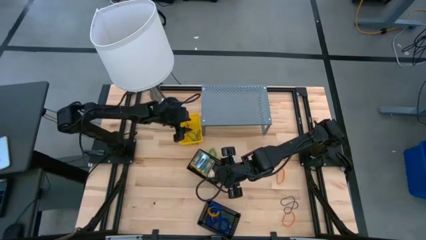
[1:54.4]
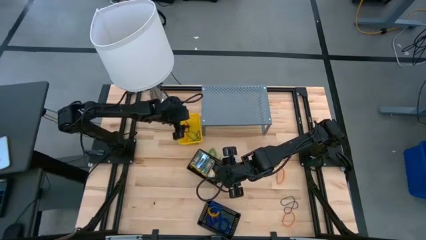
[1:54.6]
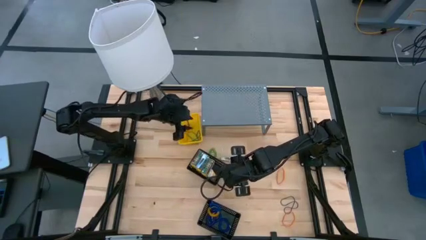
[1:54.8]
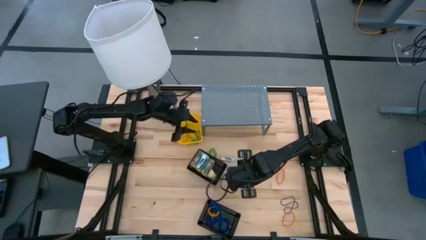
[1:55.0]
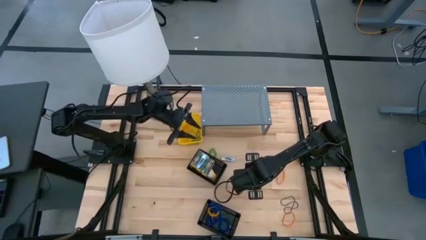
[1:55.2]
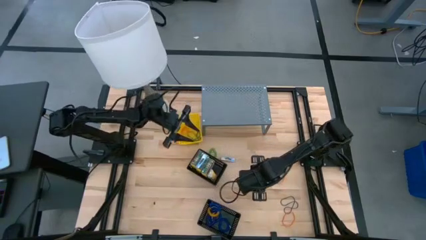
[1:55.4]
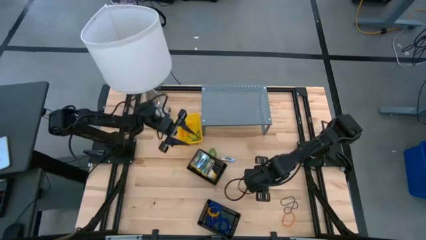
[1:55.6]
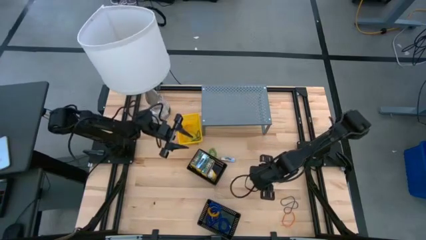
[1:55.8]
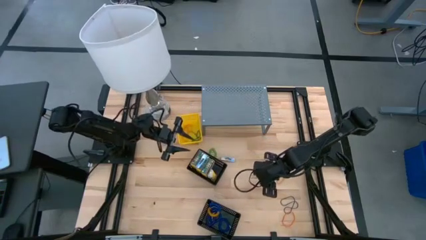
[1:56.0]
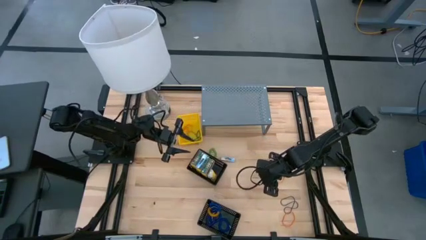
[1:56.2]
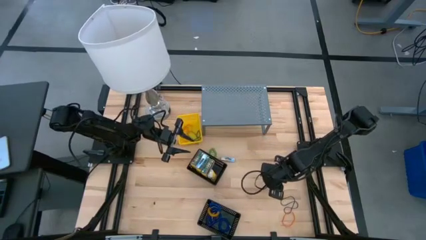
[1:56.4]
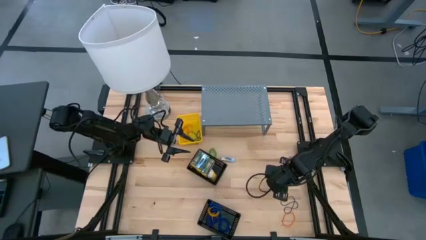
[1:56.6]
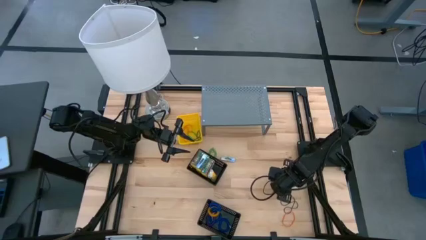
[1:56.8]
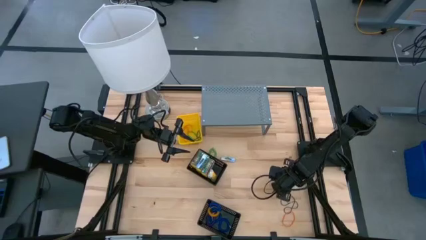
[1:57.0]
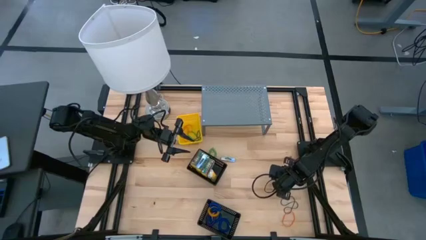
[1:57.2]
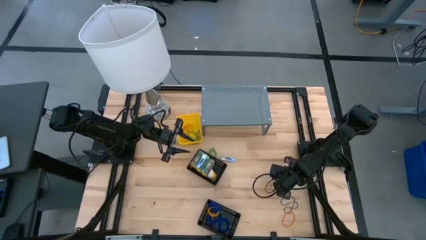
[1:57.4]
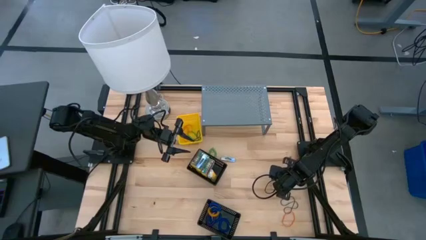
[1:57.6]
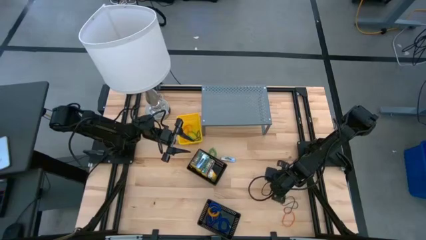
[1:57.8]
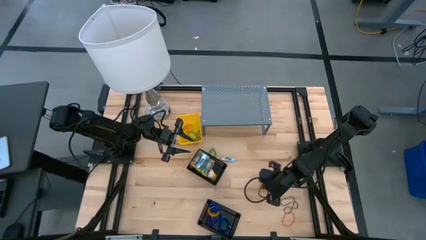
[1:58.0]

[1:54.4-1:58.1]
Task: Pick & Place Office Desk Supplies
Put the top orange rubber band into the yellow bin

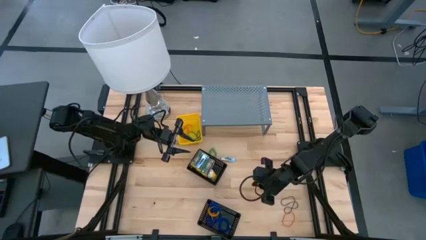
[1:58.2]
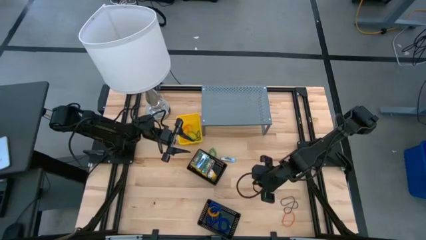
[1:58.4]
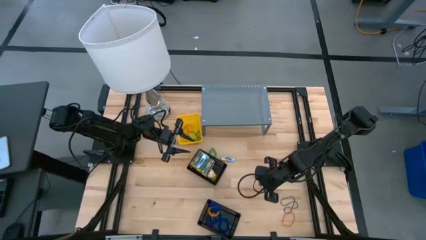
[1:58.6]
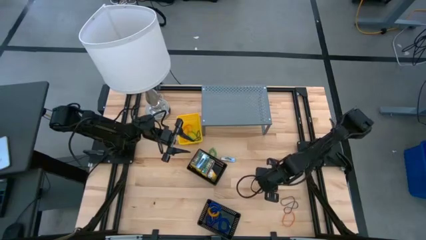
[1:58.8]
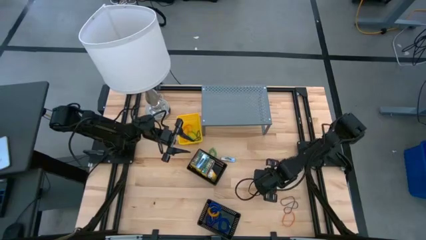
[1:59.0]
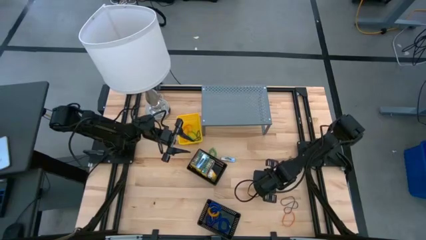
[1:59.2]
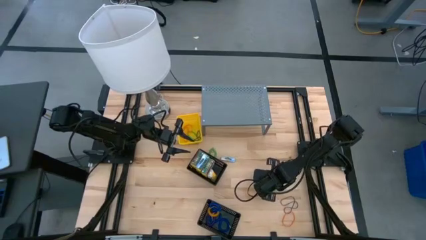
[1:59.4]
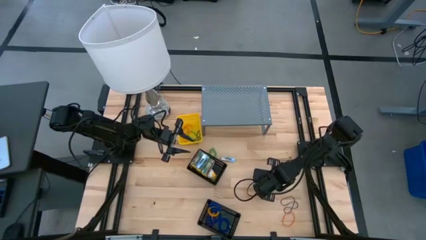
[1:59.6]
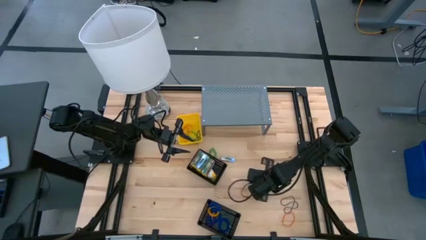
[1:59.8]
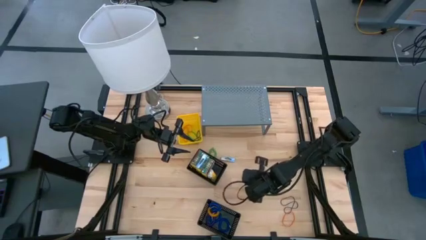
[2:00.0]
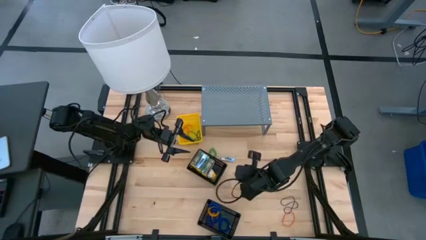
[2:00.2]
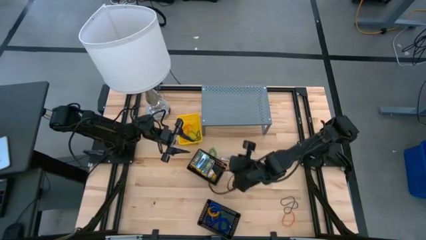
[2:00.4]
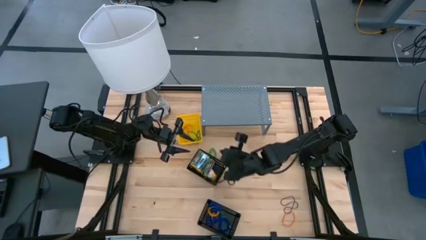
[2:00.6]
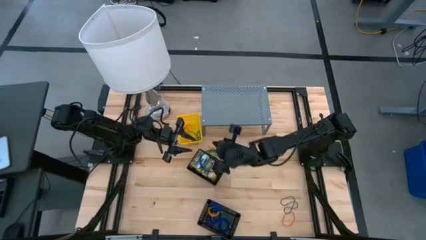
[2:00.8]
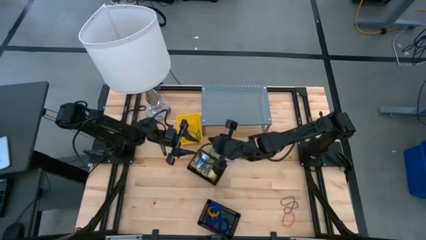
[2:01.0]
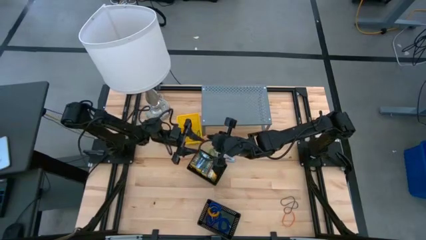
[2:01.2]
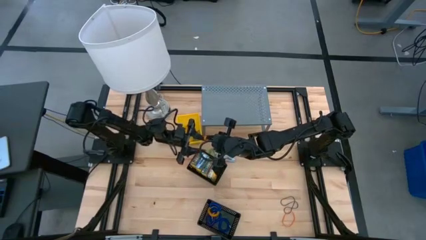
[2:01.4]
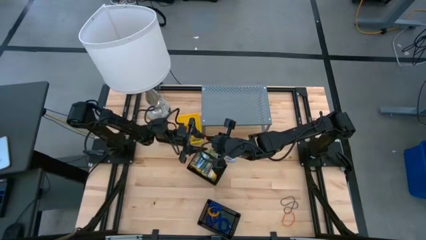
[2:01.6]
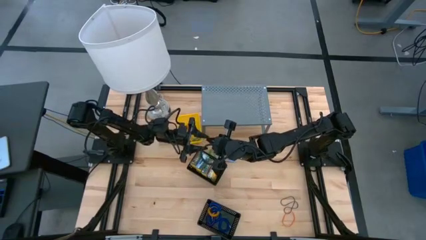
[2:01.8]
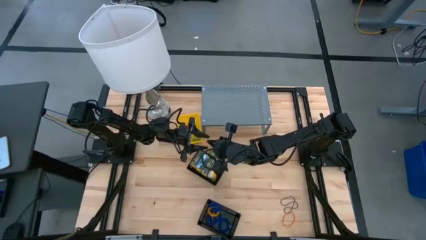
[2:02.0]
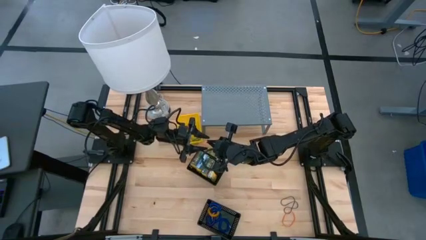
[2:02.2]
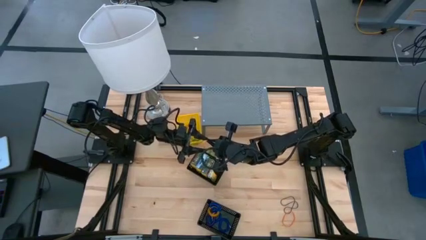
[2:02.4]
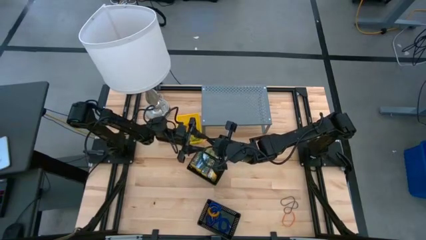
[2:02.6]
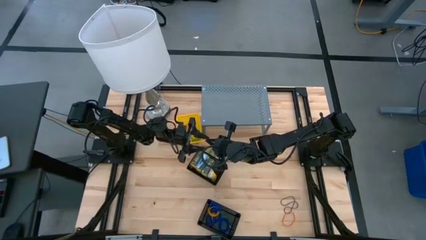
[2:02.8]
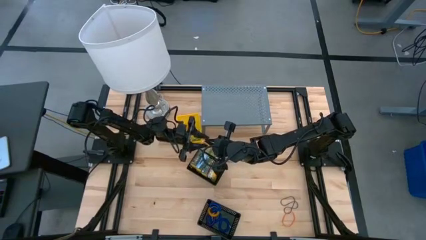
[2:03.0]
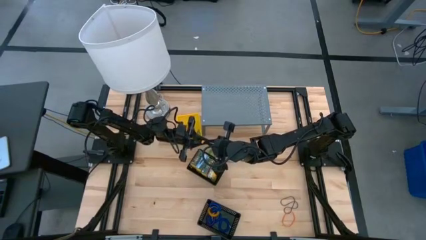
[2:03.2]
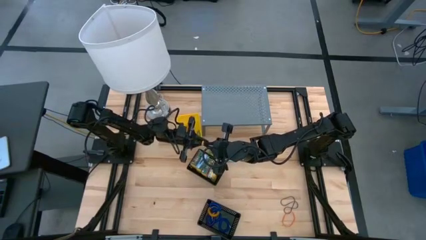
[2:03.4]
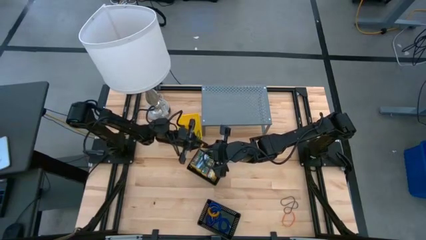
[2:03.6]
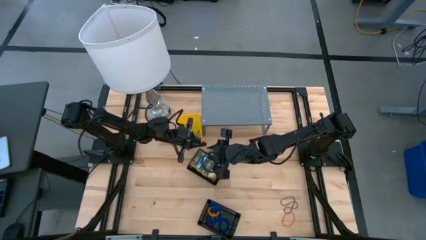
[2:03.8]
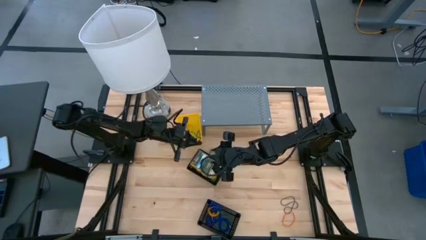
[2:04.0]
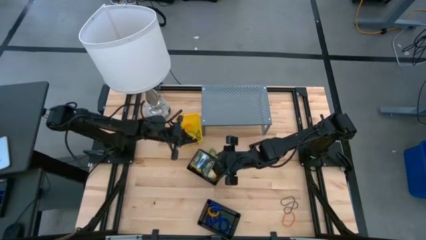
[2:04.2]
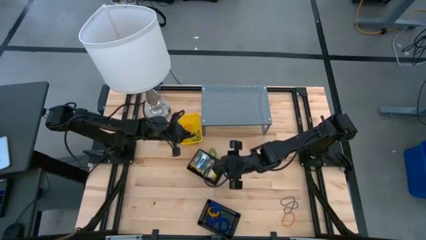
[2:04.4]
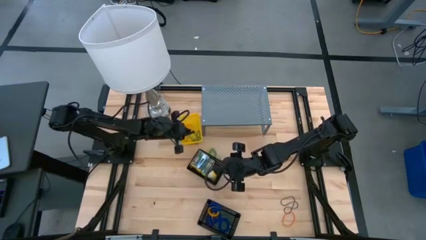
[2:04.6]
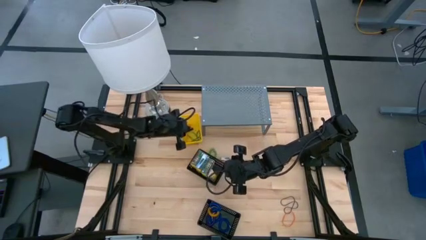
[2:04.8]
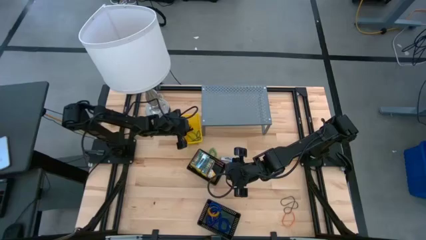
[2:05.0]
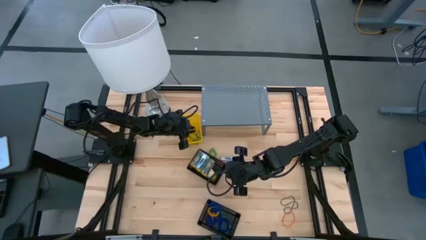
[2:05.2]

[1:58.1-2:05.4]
Put the top orange rubber band into the yellow bin

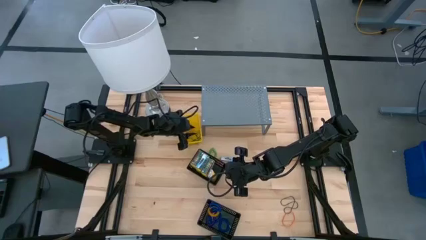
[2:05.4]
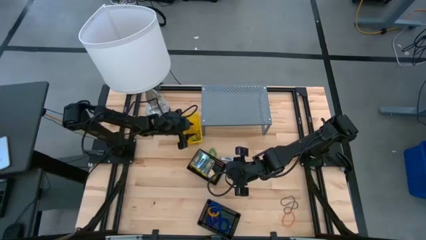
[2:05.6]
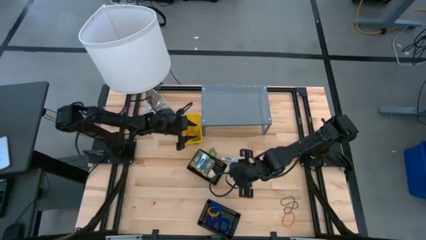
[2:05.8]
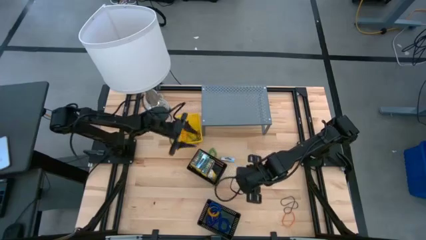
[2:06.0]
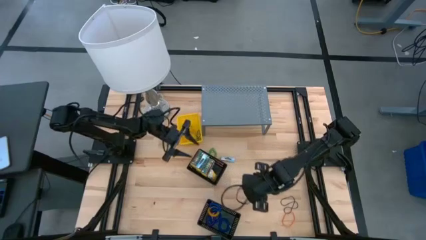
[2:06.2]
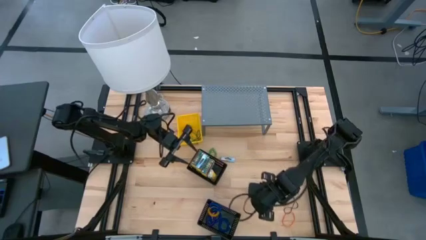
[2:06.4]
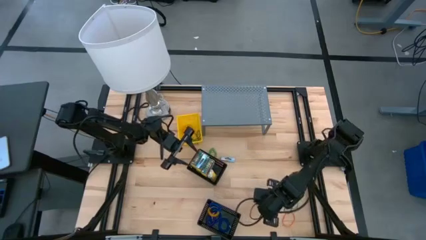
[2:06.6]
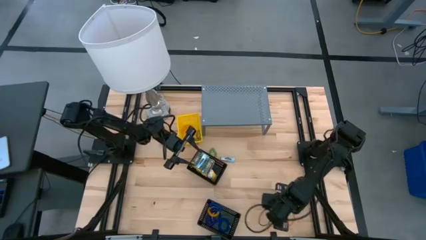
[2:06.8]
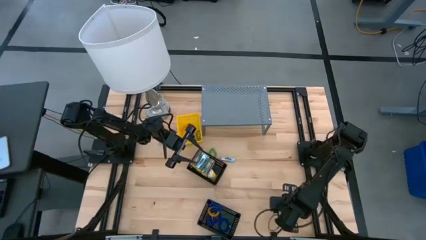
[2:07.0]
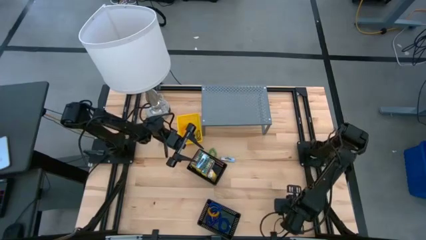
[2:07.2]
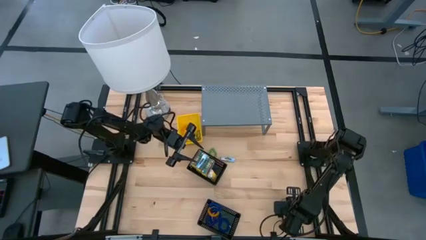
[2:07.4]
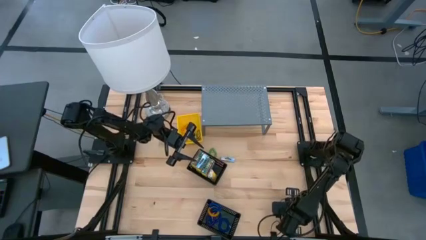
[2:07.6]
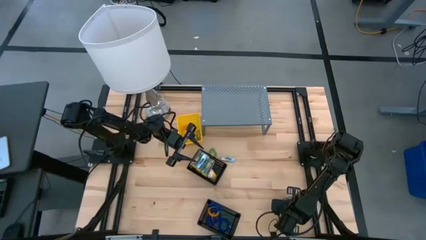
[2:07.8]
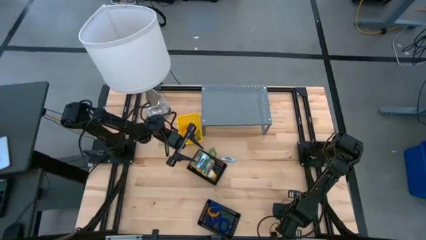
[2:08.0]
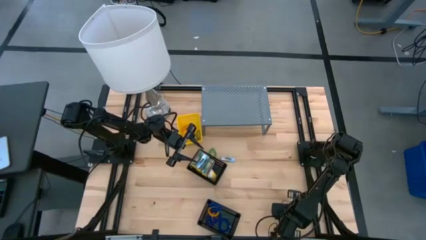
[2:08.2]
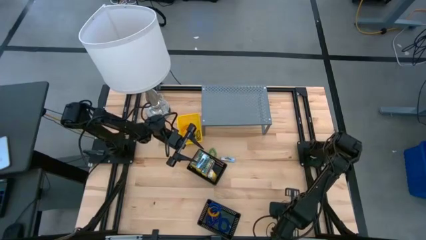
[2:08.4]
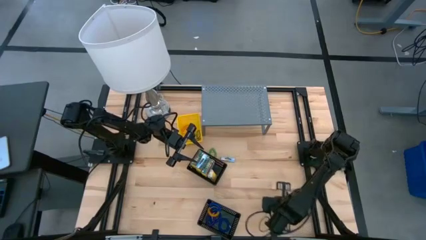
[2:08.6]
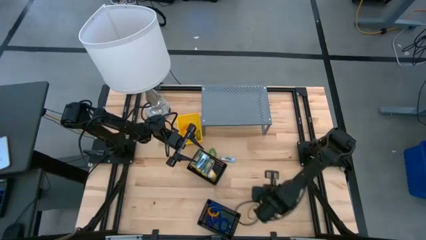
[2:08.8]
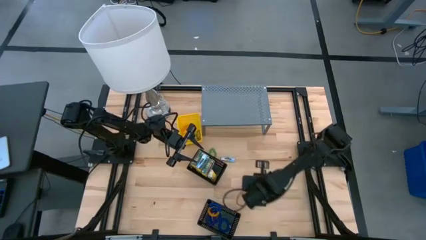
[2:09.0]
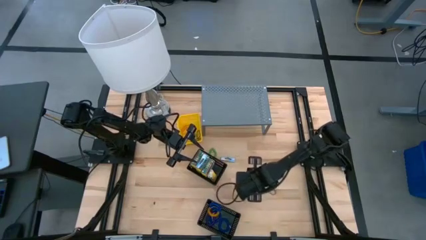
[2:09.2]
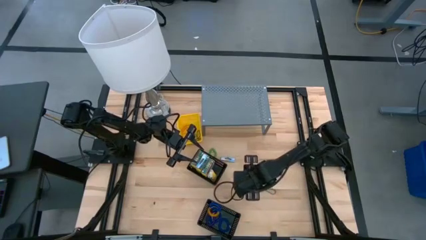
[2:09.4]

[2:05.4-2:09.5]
Put the orange rubber band into the yellow bin

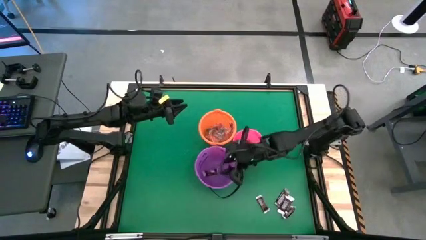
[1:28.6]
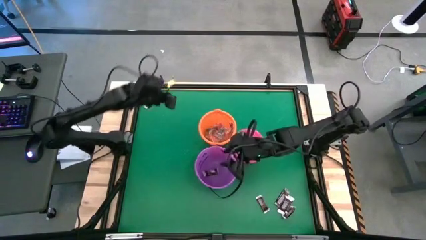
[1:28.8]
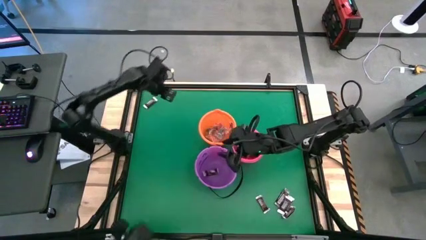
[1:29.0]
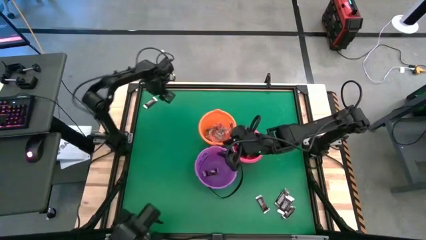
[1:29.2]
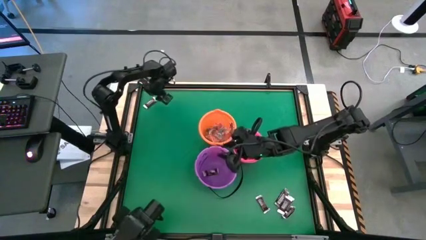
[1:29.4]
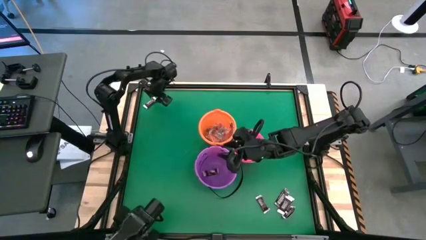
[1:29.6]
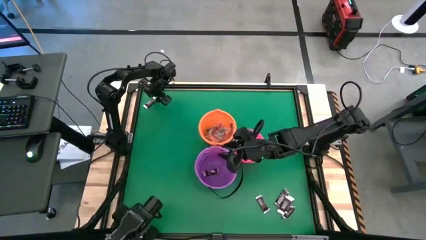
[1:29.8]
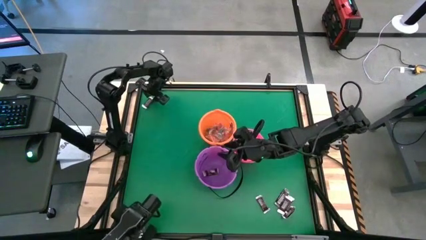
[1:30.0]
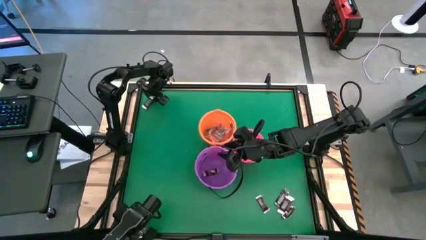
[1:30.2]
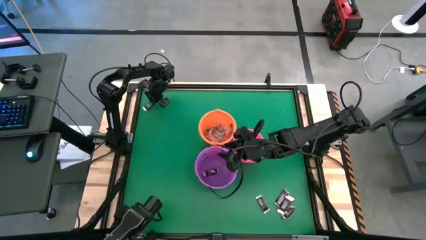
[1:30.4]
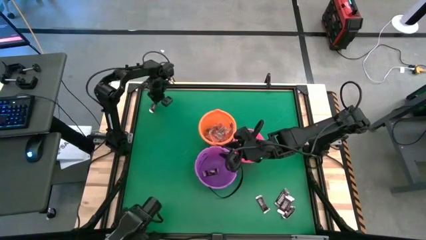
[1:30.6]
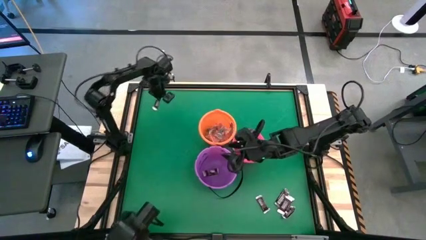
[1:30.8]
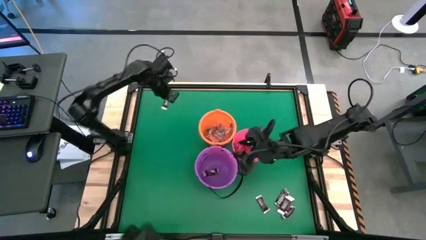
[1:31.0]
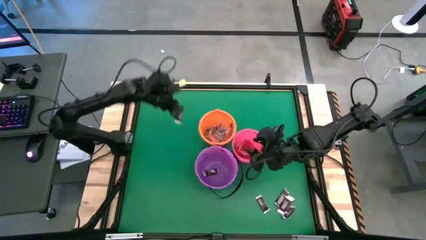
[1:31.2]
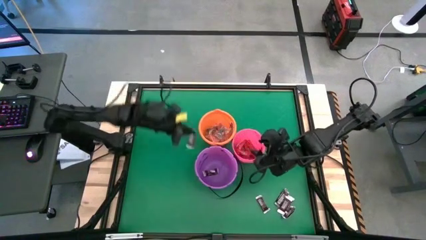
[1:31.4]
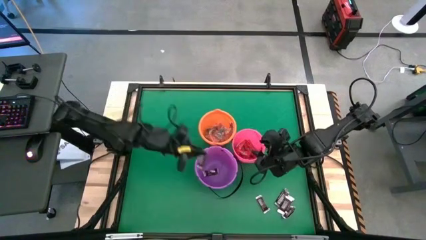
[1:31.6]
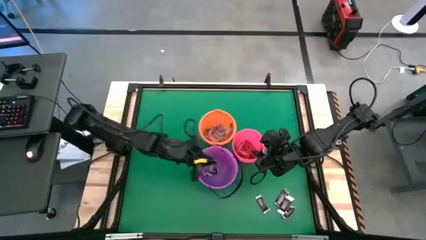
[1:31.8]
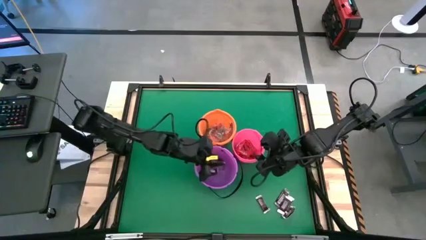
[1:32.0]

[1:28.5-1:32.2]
Task: Sort candy by brand, put in halloween buckets
Put the brown chocolate bar into the purple bucket
